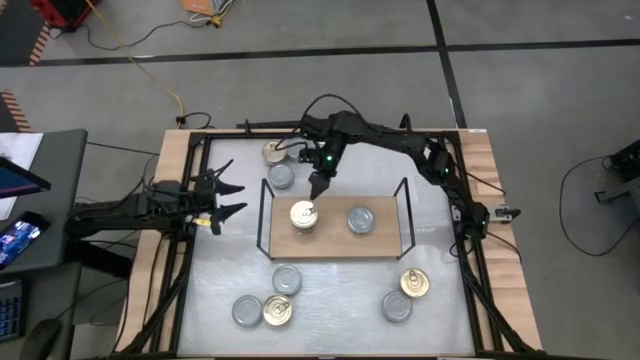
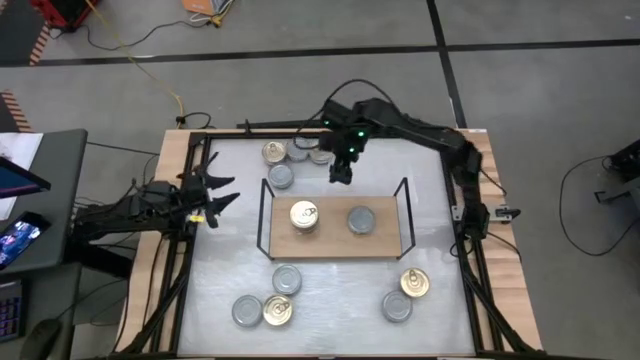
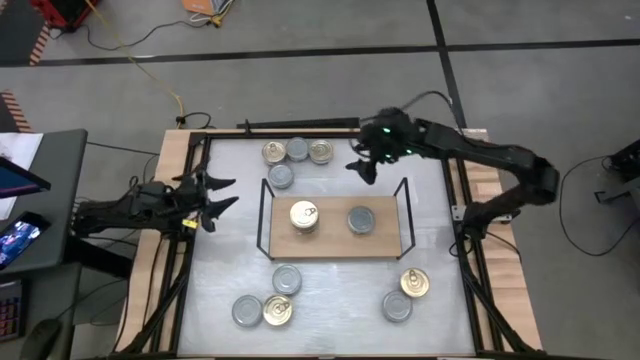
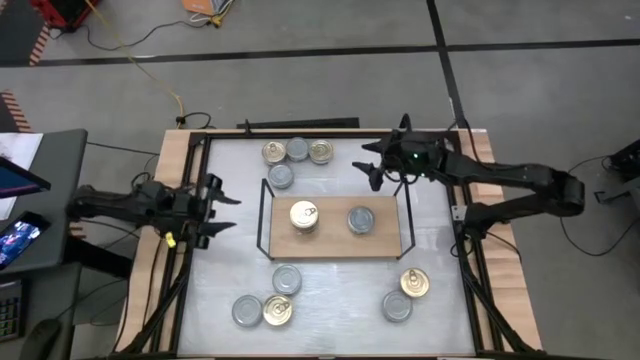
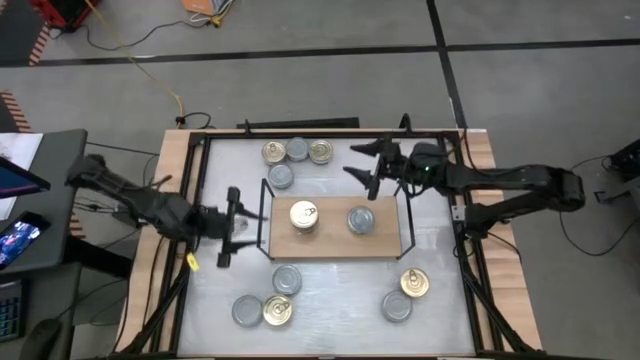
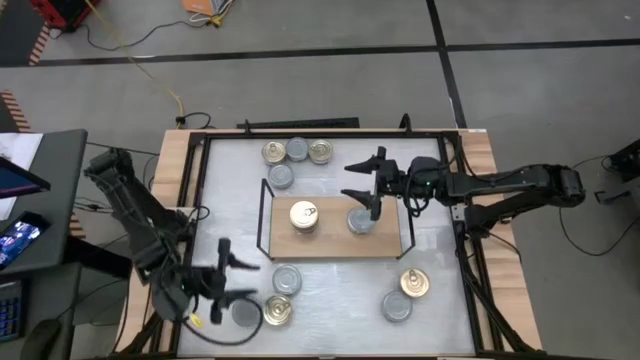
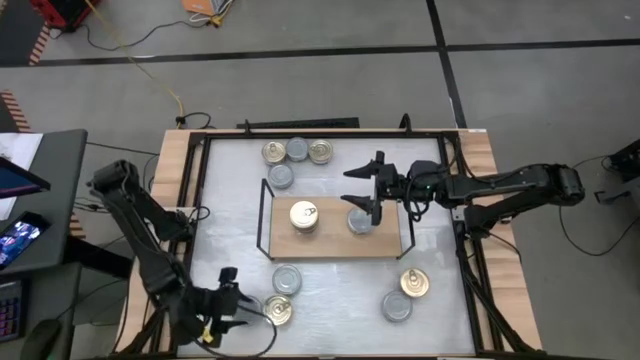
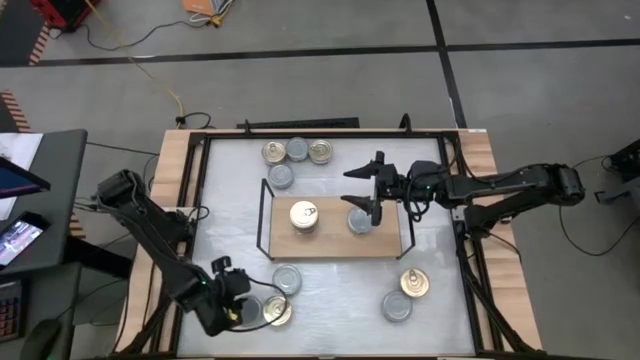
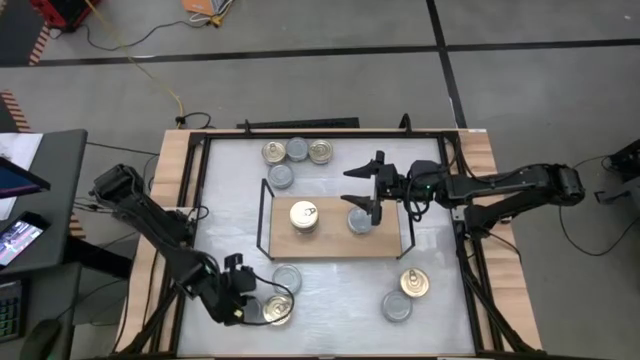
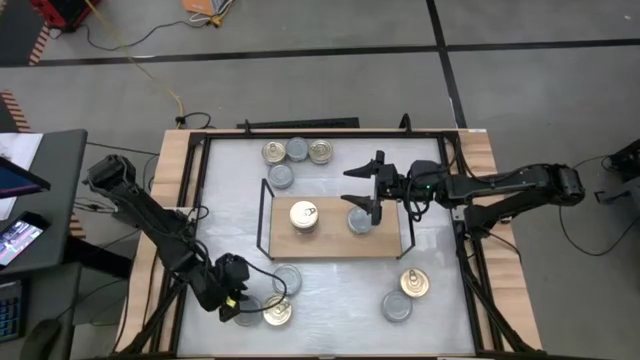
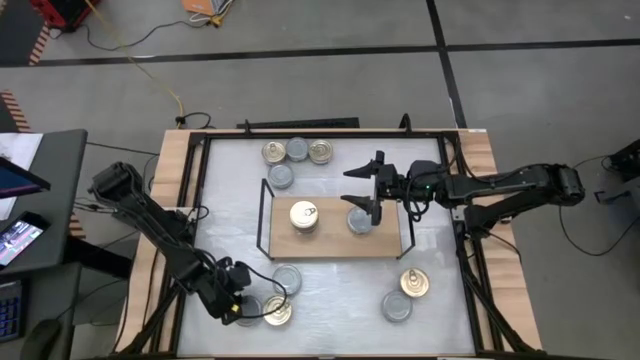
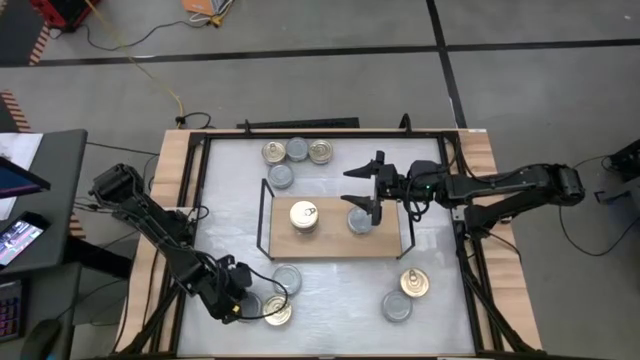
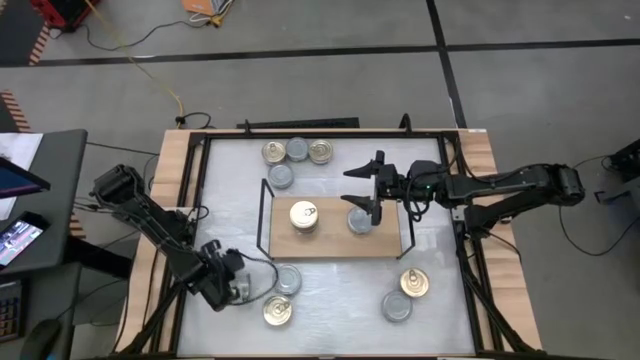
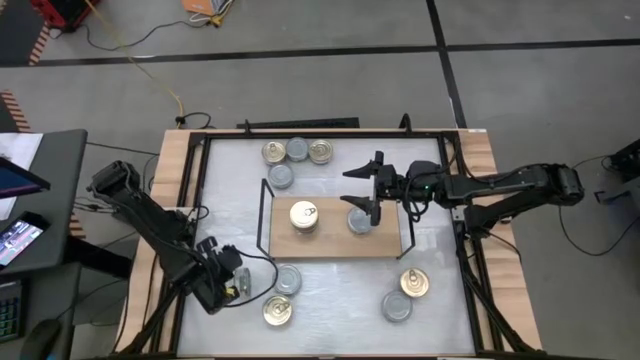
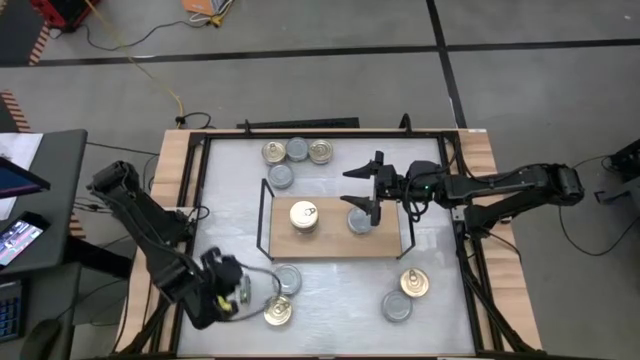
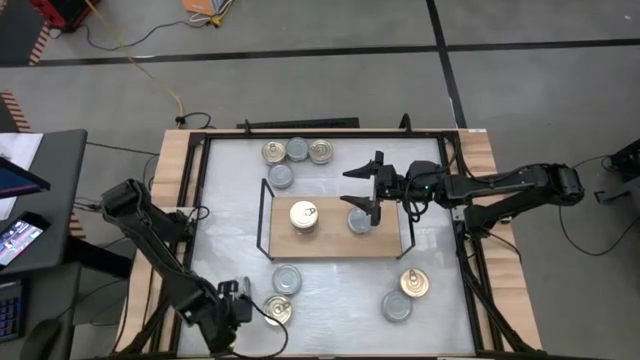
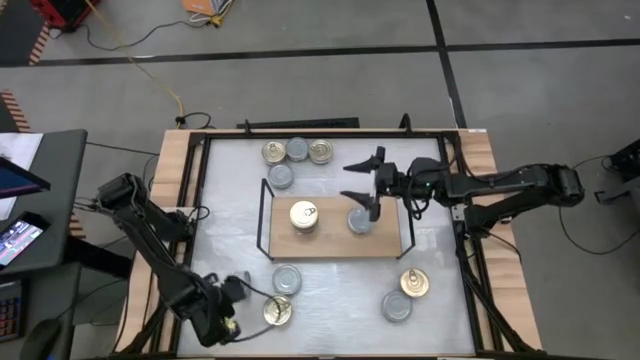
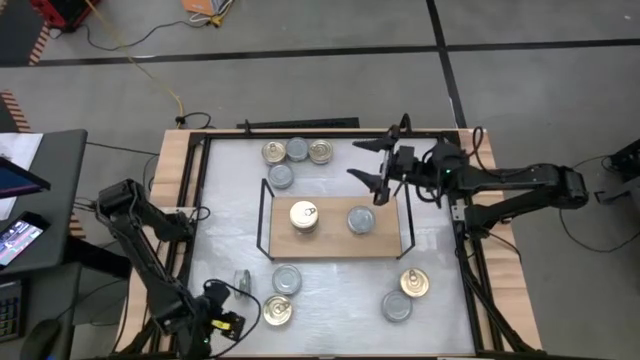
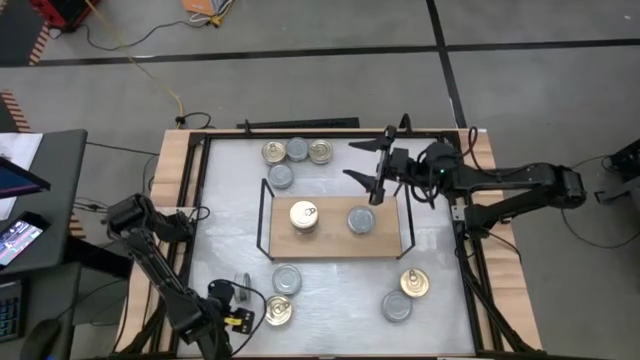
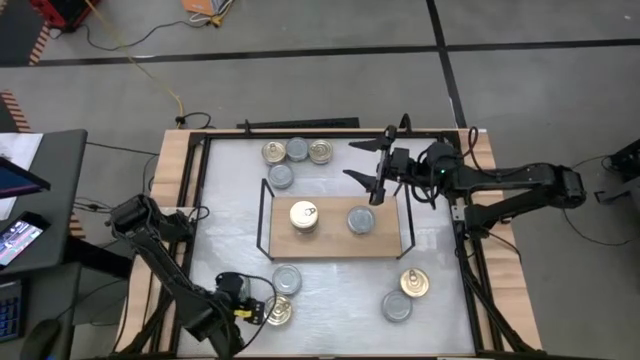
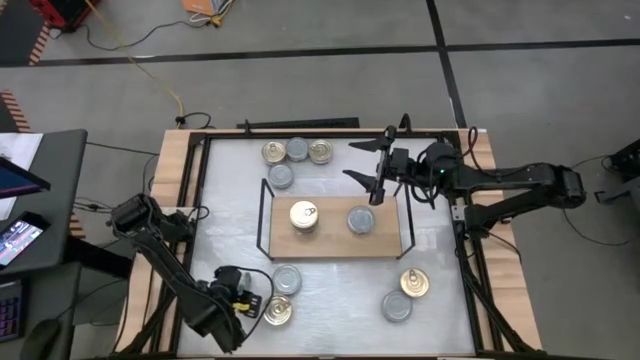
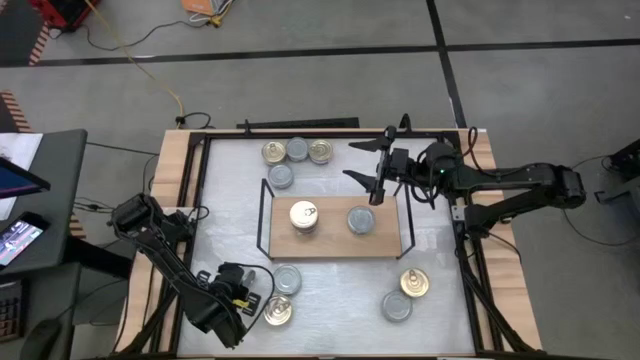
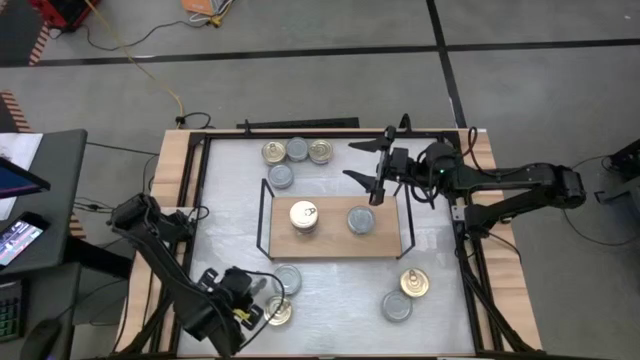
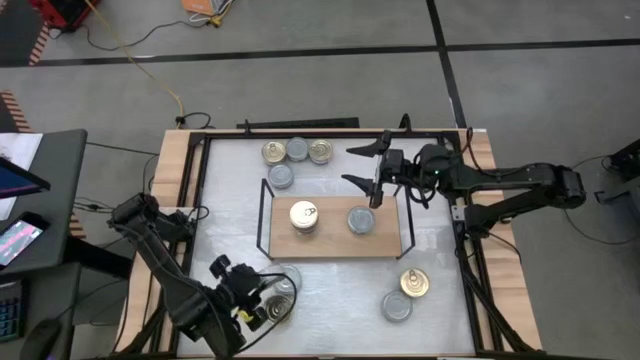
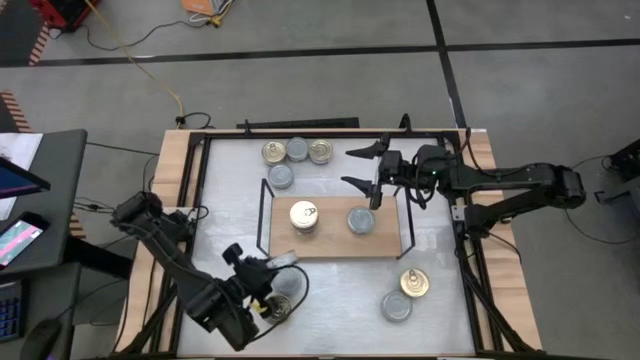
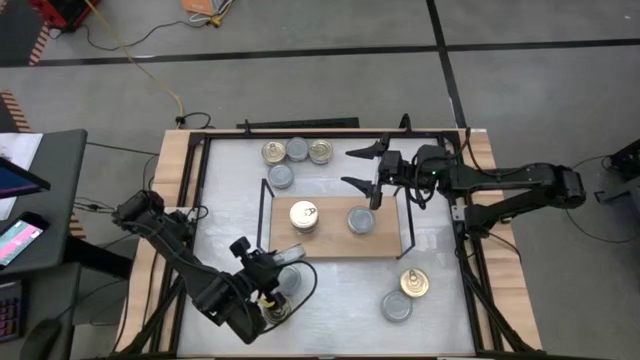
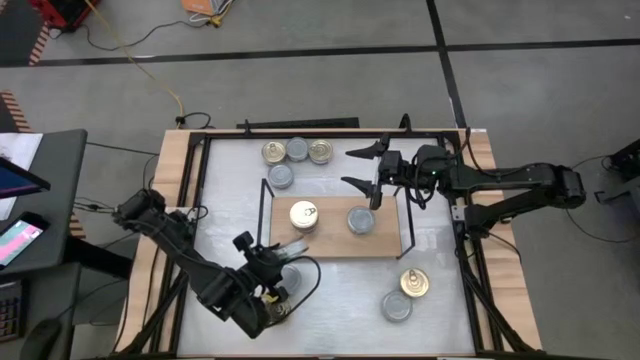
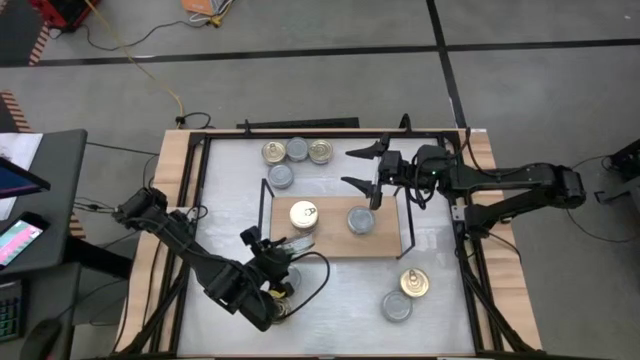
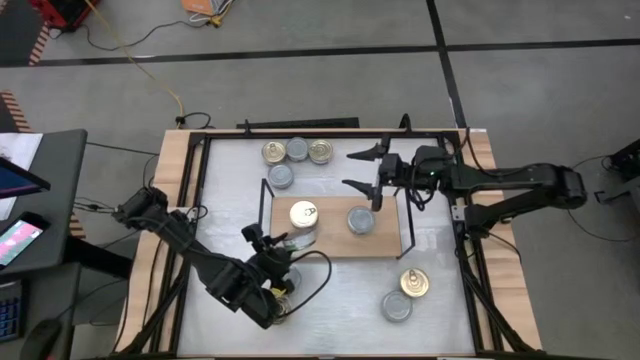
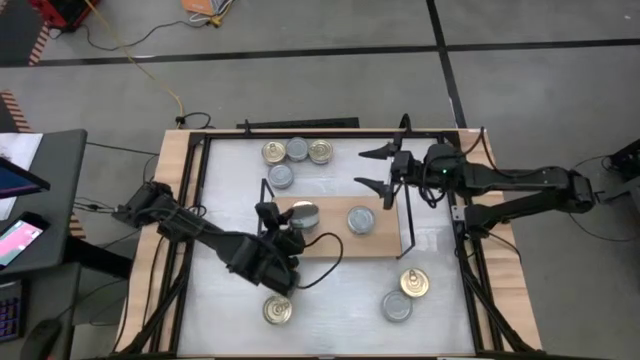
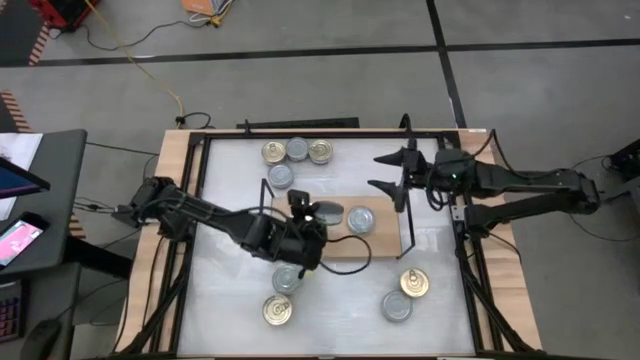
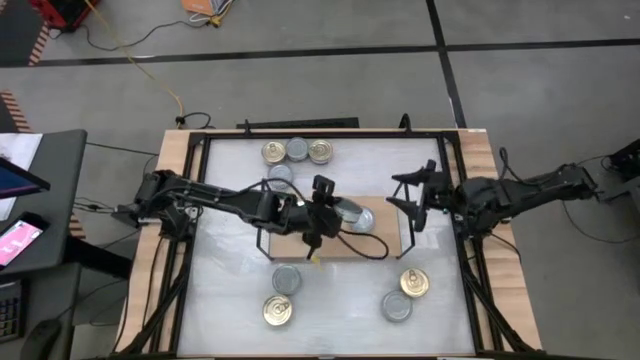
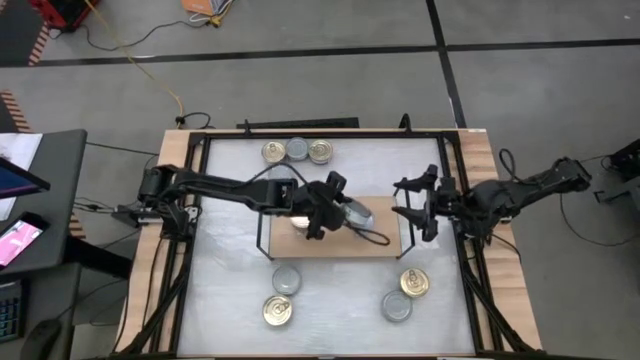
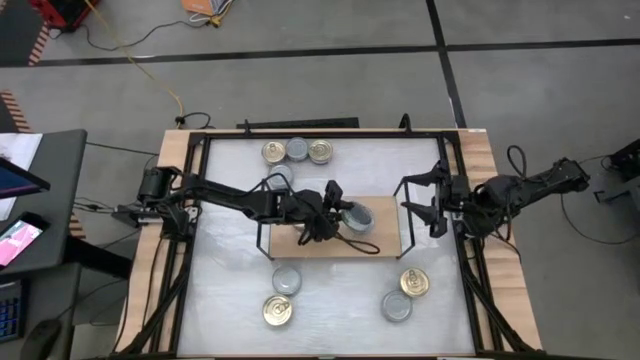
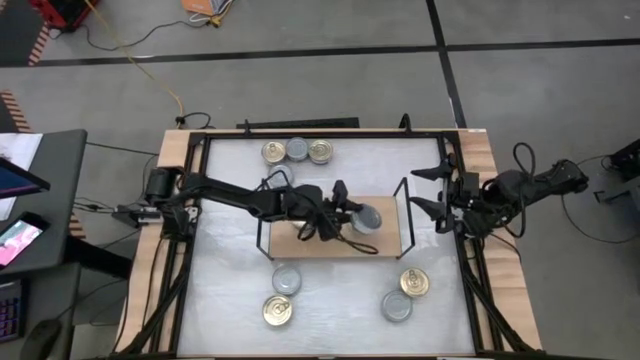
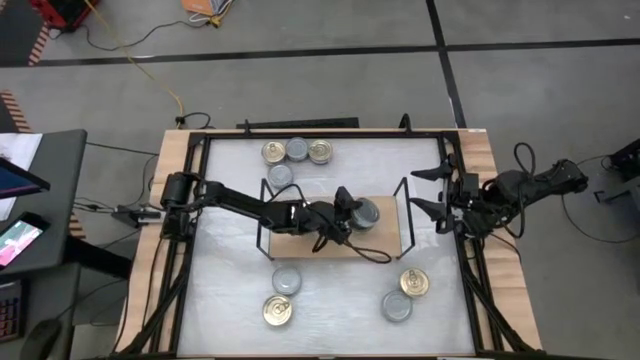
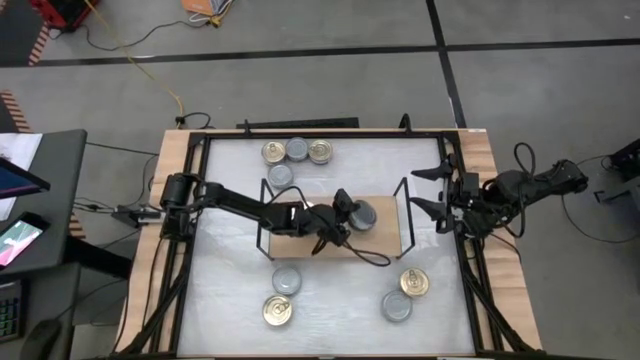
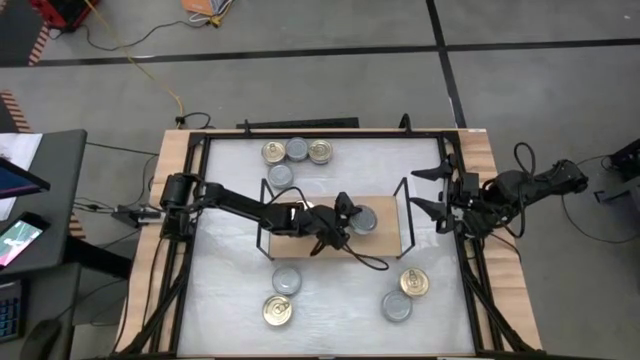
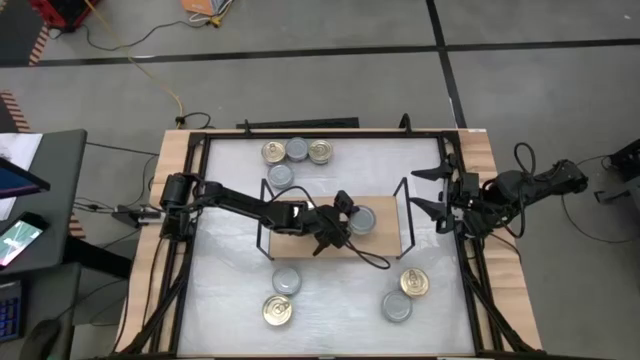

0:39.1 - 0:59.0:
Task: Stack canned seafood by type on shelf
Stack the green tuna can on top of the green tuna can on the shelf

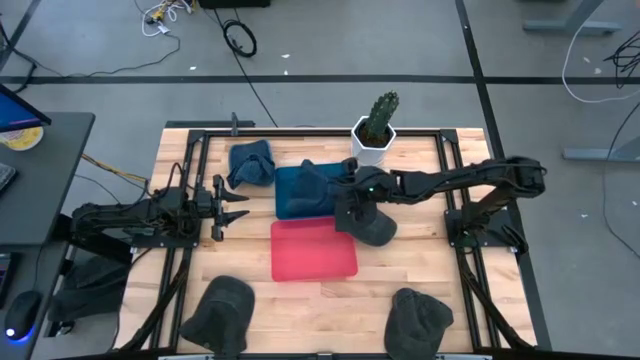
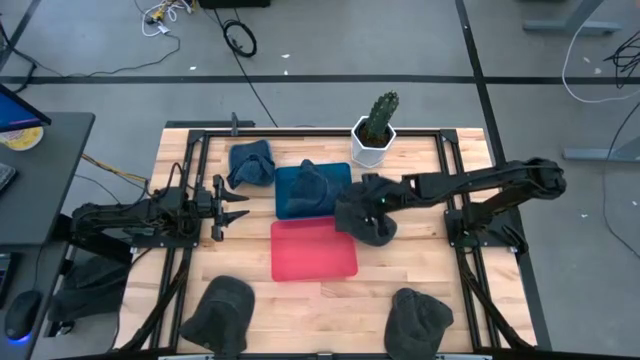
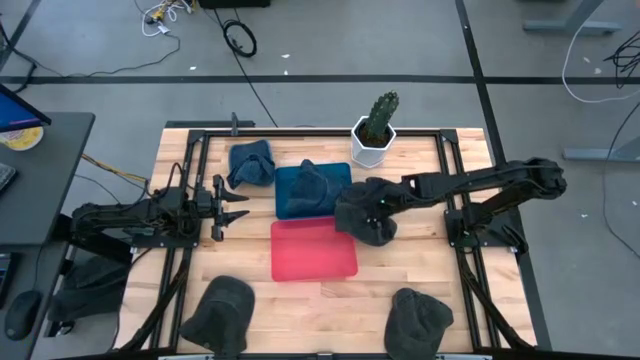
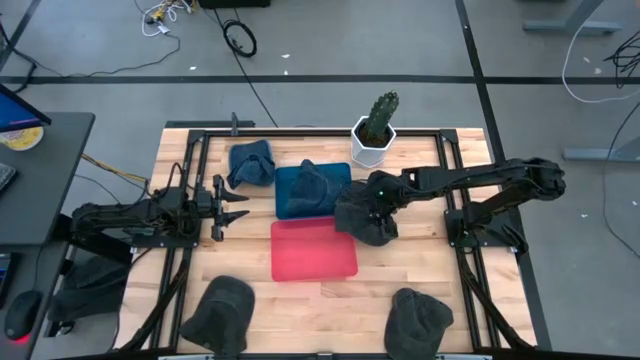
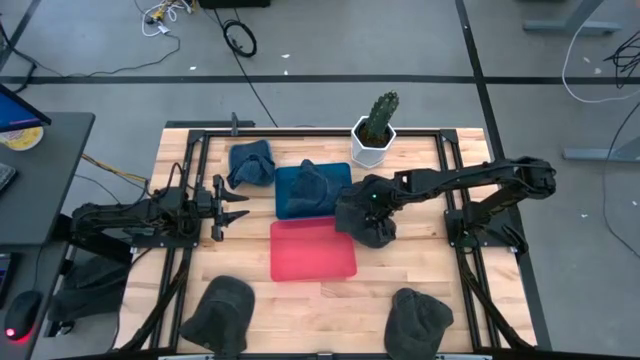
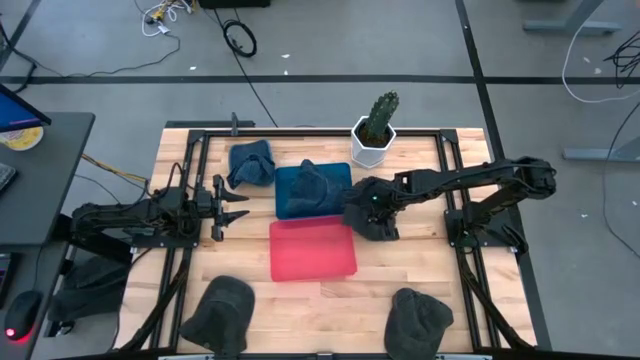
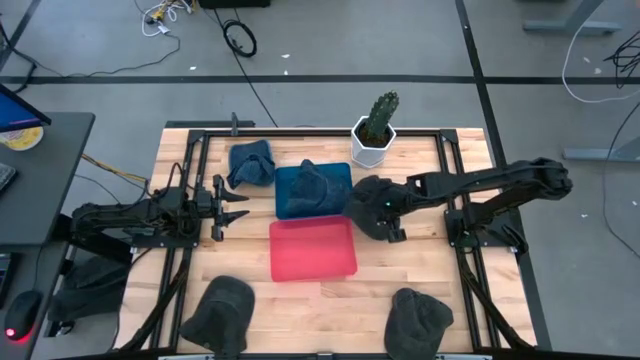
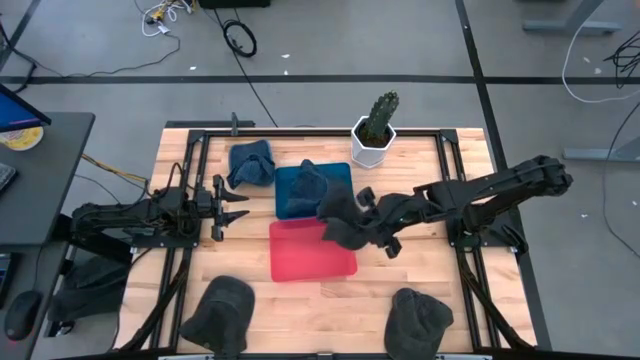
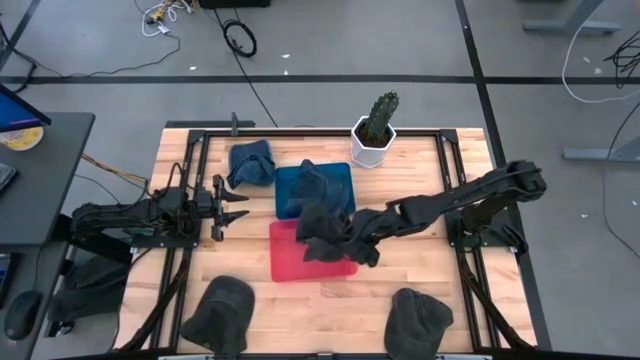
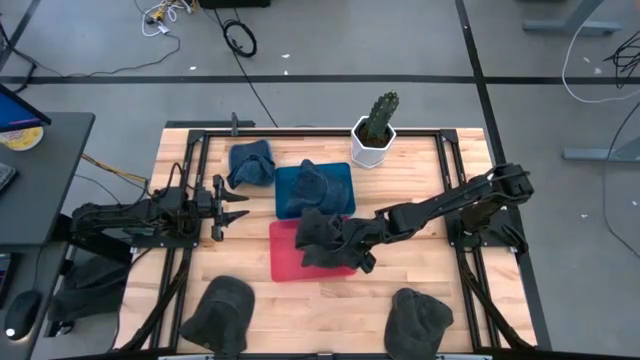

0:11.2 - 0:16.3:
Task: Pick & Place hat
Put the top black cap into the pink bin
